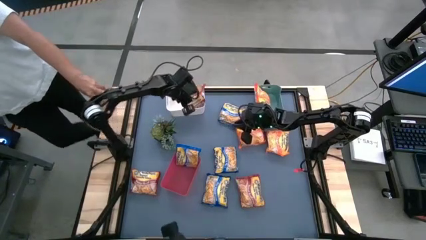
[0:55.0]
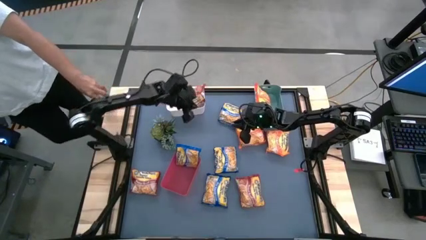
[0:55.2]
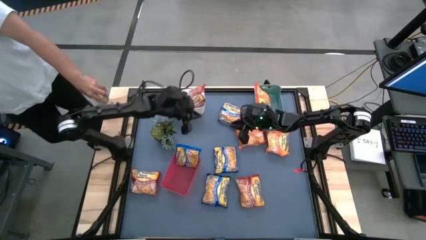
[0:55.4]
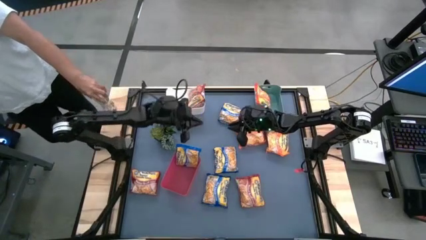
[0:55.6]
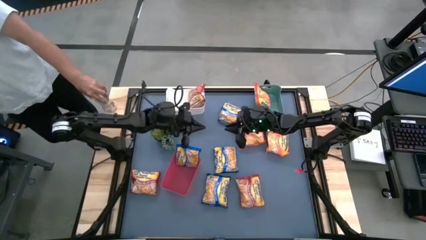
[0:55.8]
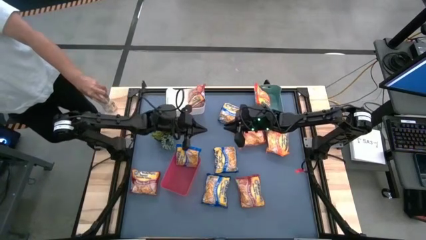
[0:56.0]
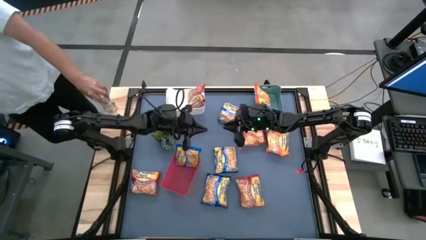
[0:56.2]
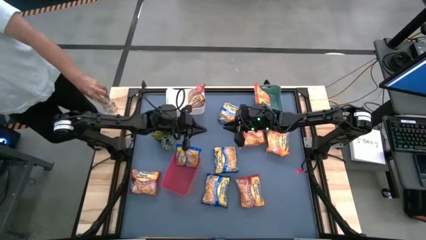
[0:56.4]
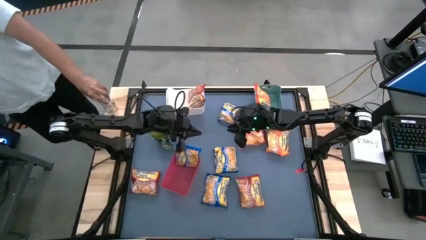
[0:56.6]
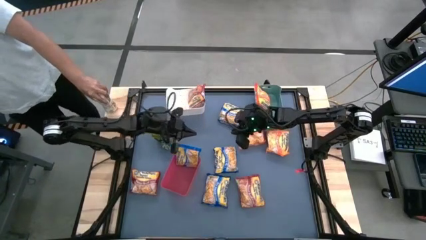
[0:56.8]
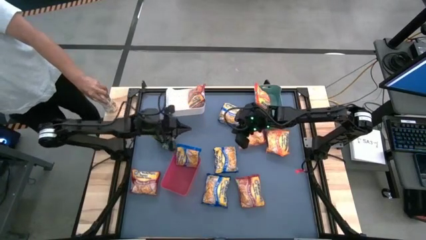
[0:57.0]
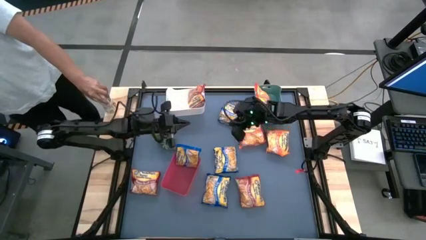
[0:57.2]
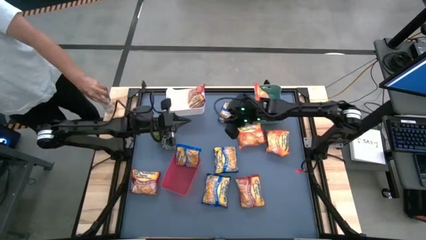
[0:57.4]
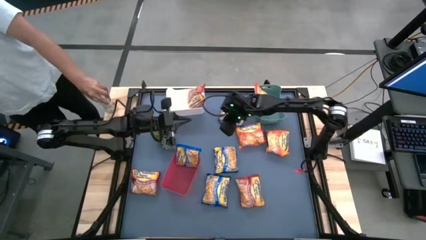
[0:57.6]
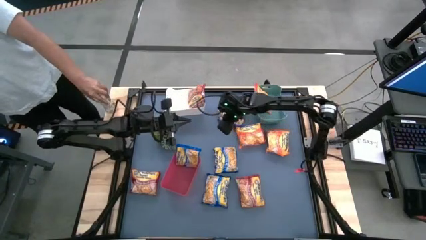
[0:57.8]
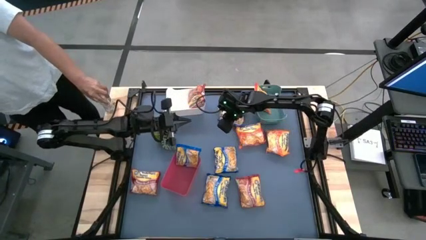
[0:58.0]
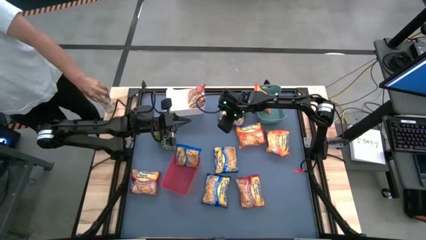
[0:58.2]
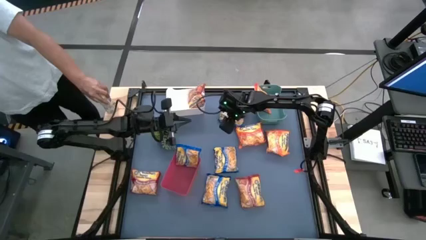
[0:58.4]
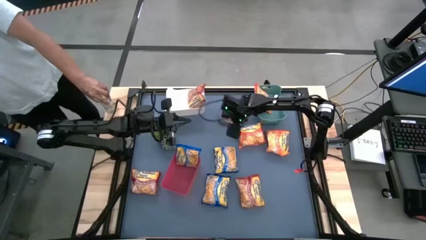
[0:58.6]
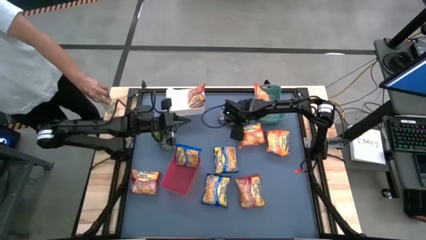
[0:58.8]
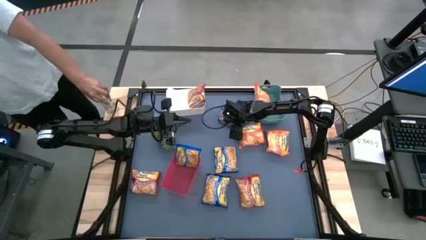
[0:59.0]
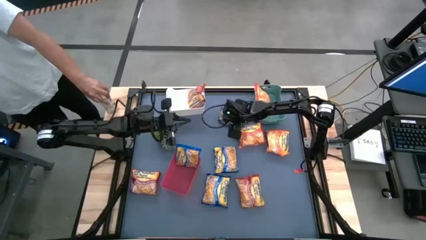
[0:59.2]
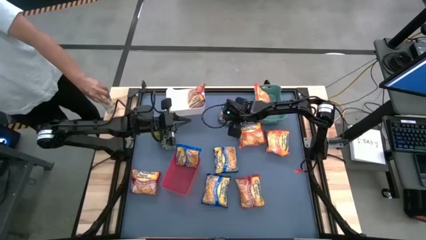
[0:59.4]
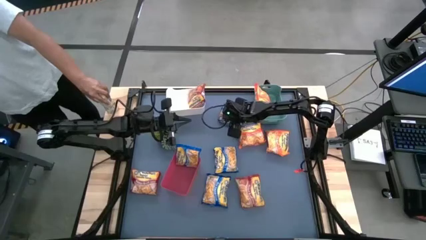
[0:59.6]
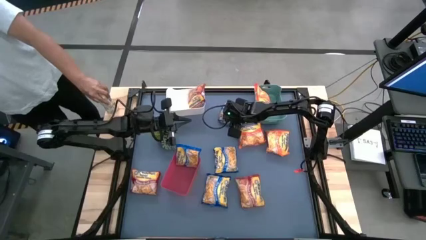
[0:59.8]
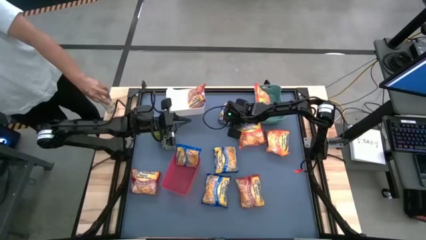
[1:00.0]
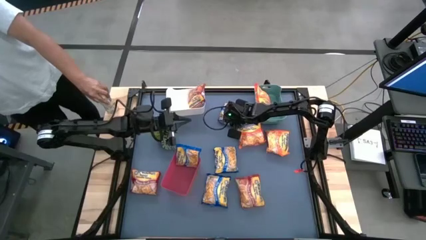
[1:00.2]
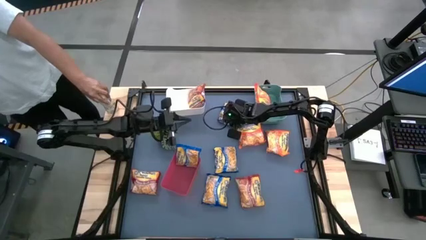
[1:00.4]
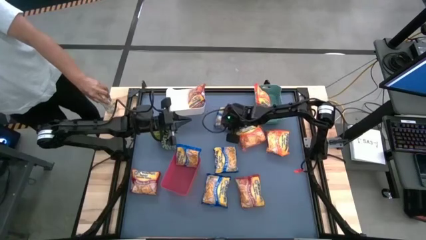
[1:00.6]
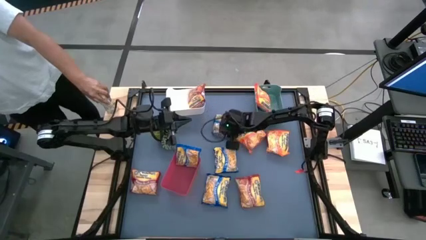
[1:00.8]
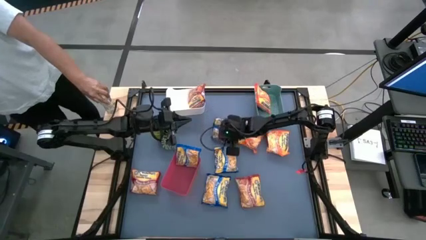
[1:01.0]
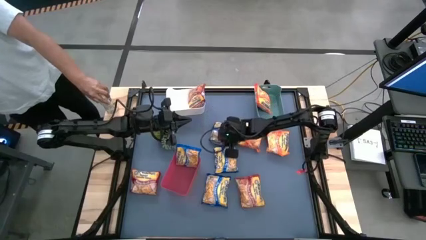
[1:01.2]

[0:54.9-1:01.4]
Task: Sort Maruchan noodles
Put the top blue noodle pack into the red bin

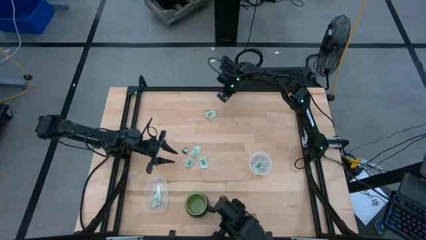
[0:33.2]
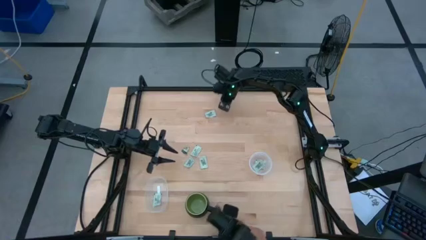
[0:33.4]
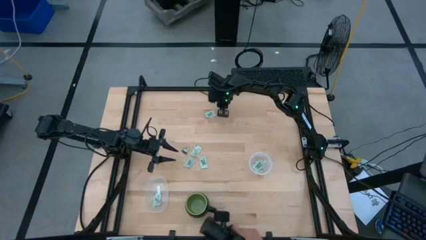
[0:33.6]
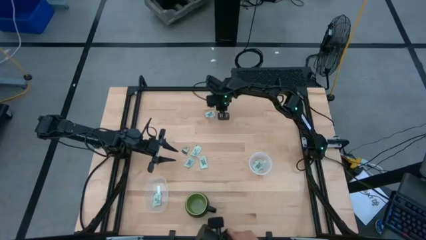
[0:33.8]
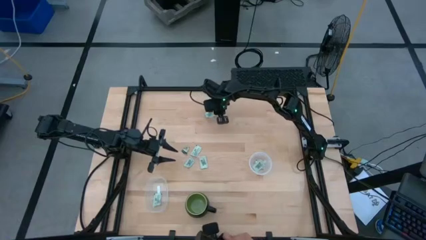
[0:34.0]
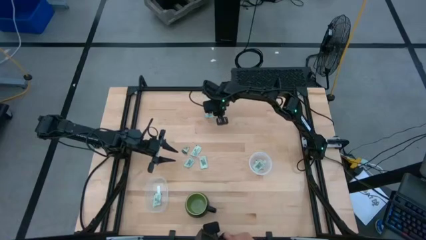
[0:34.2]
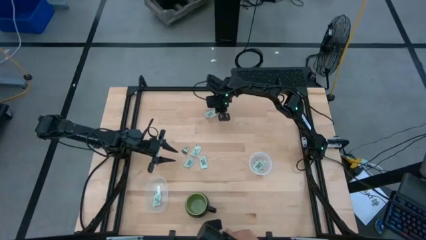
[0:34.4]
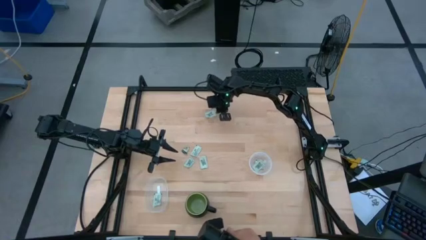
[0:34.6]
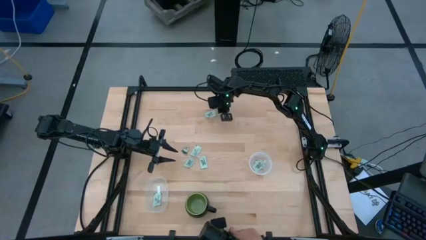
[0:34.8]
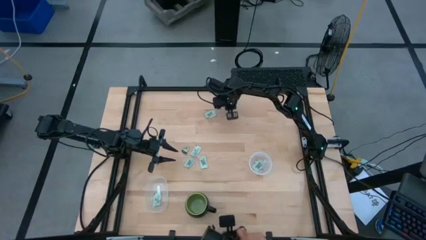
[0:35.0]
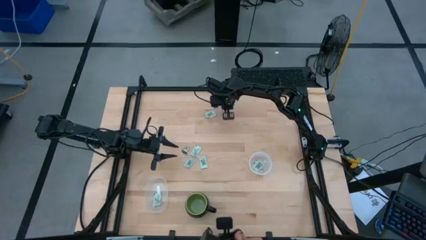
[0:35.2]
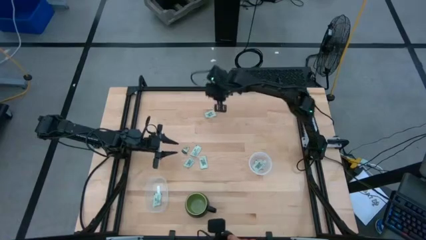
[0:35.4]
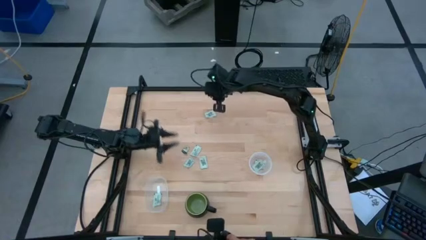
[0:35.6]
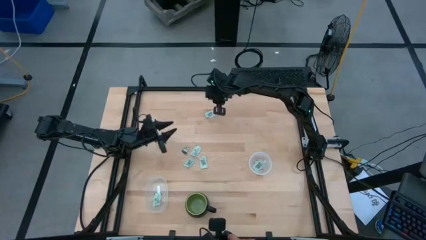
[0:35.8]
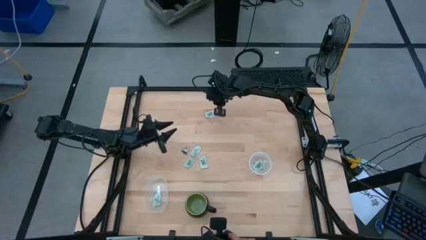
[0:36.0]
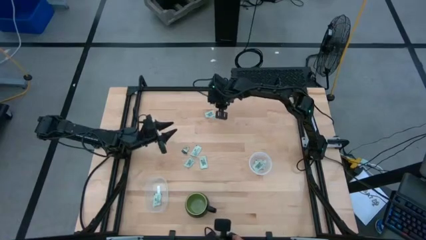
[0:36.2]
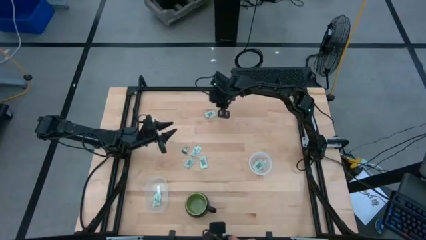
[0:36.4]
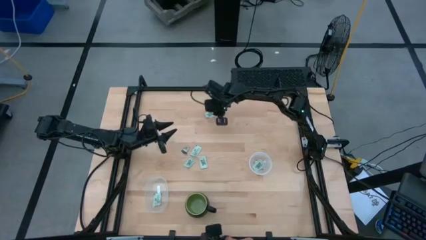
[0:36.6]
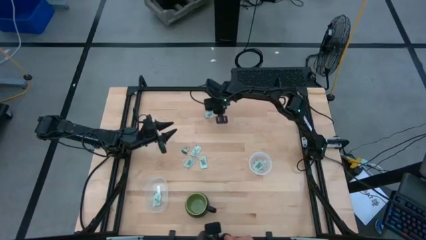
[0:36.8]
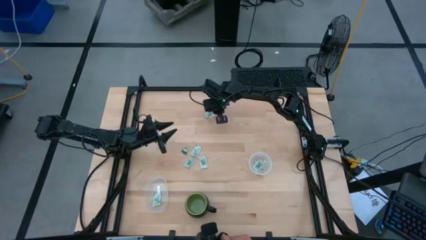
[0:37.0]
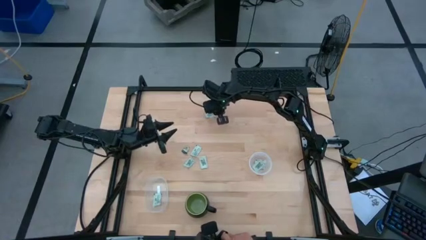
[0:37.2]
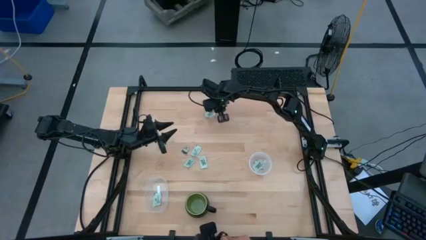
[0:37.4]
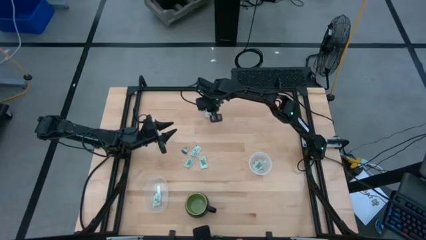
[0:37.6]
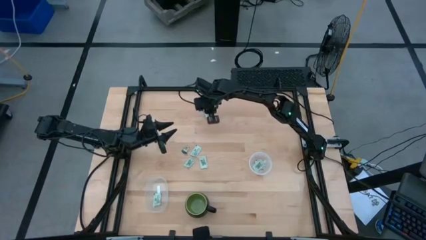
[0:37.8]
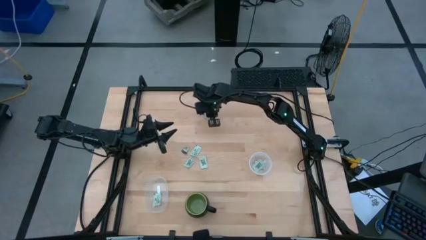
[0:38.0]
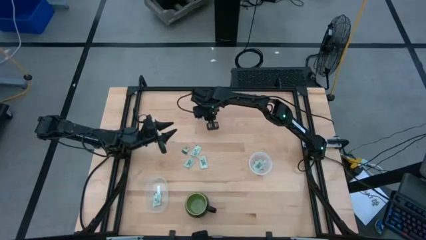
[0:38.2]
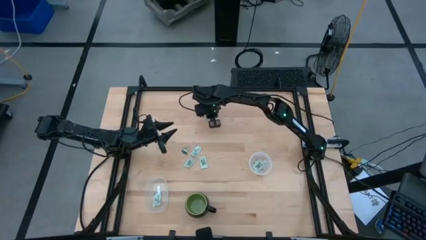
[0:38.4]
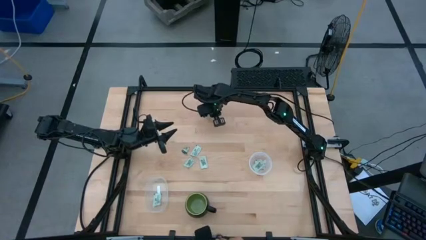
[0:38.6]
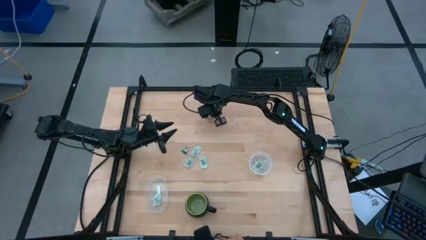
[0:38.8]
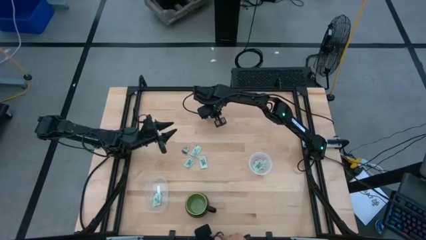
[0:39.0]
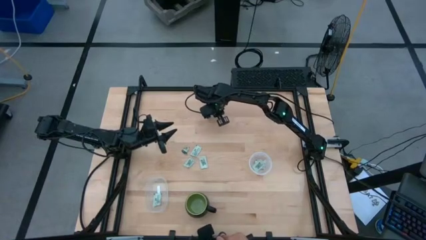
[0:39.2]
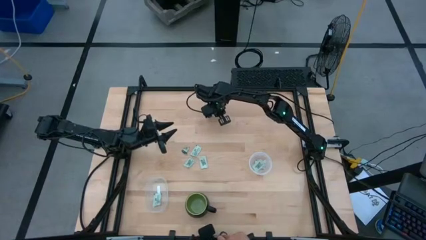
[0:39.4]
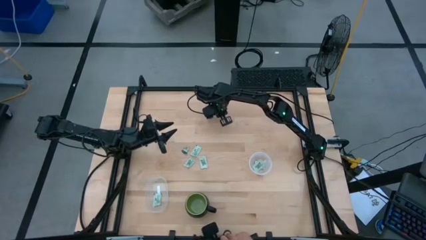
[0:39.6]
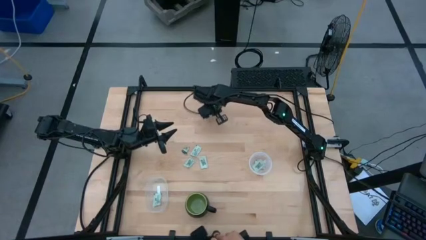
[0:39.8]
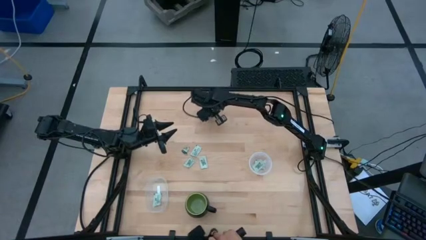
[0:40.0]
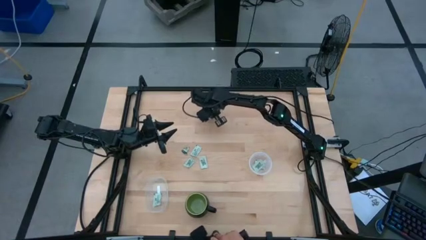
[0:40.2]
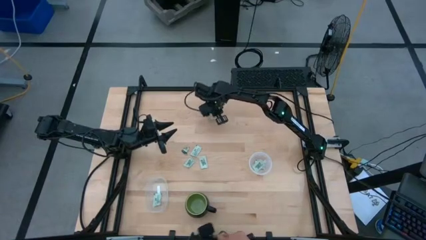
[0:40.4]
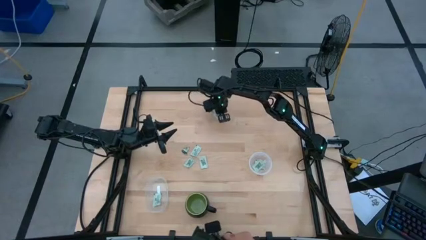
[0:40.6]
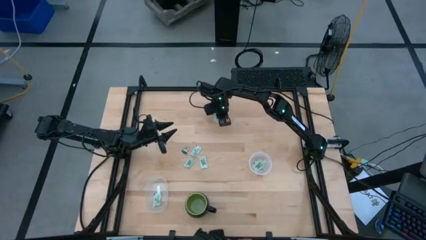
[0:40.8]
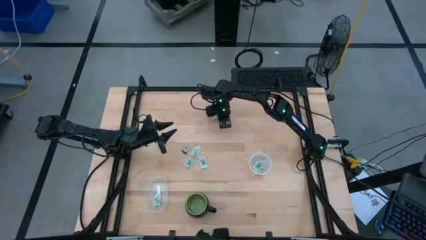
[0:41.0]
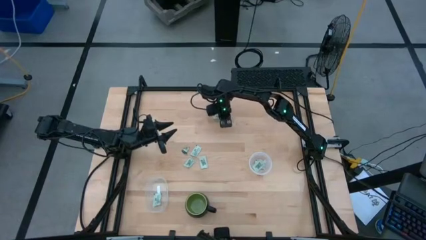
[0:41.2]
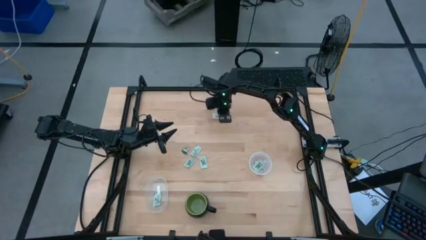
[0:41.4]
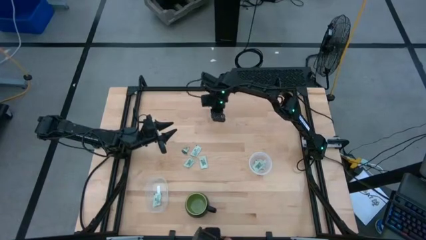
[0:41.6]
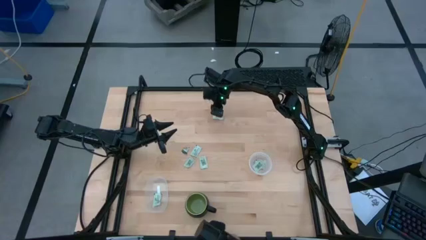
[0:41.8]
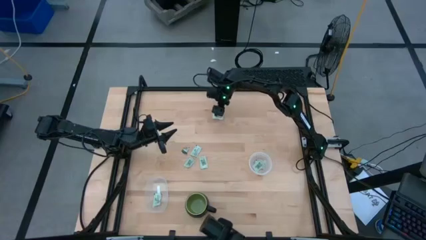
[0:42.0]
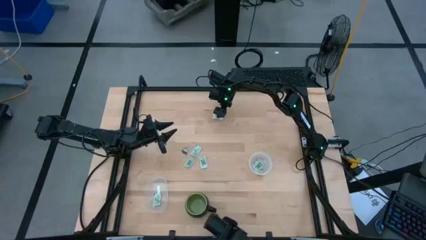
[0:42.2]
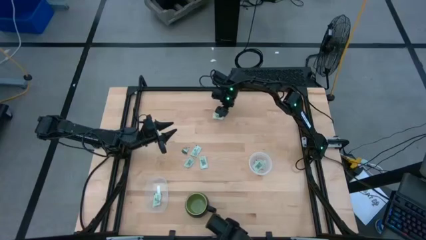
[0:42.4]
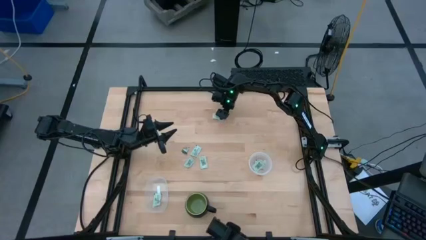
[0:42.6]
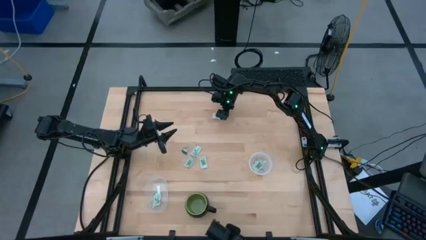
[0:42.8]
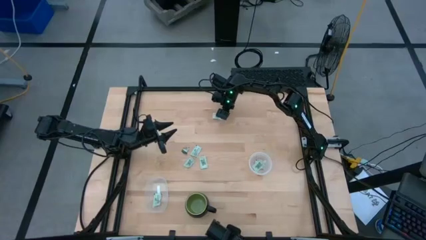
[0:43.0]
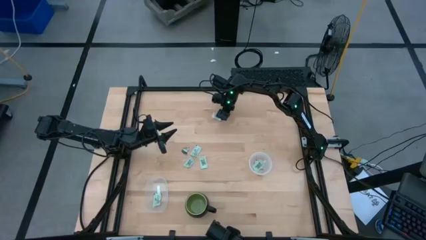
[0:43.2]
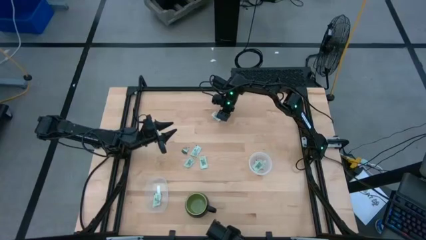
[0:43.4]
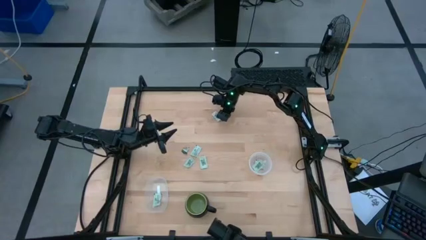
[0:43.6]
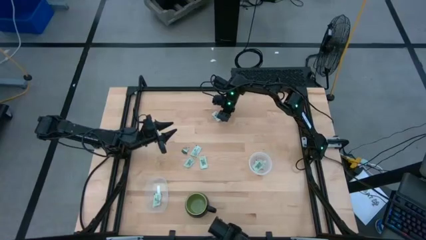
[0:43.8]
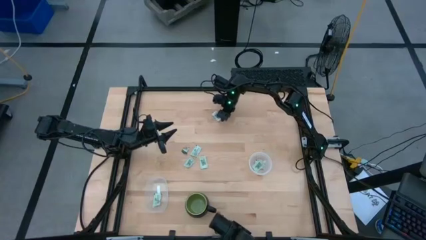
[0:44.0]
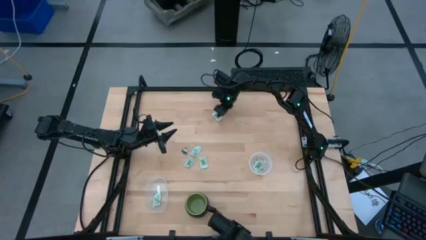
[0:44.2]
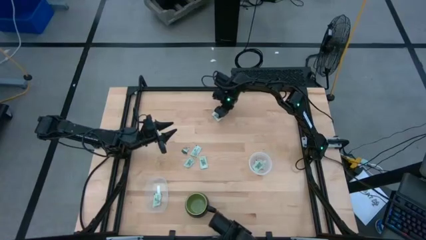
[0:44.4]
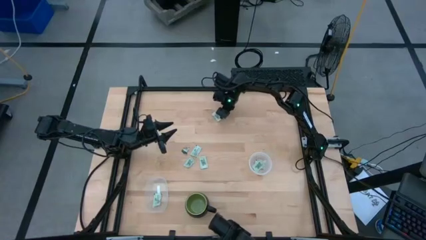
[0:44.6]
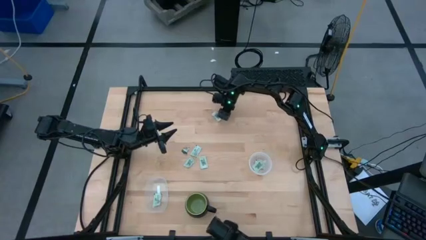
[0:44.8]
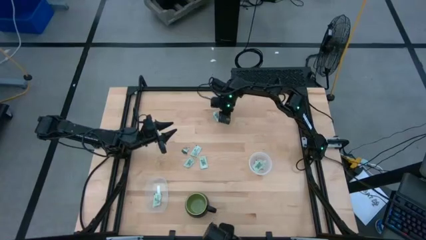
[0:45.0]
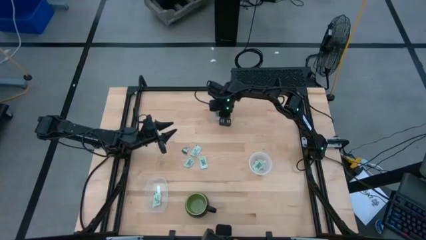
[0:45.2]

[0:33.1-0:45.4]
Task: Pick and place Stevia / Truvia into bins
Put the white stevia packet into the circular transparent container
